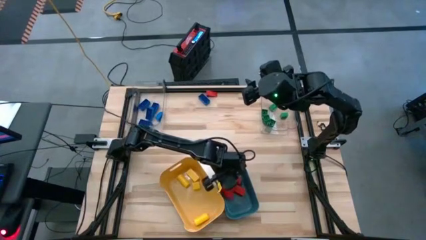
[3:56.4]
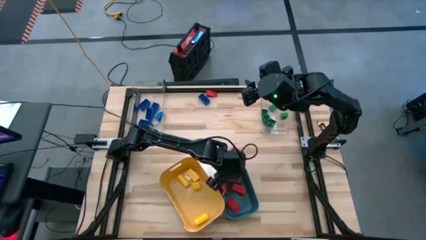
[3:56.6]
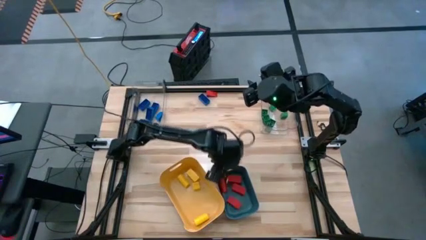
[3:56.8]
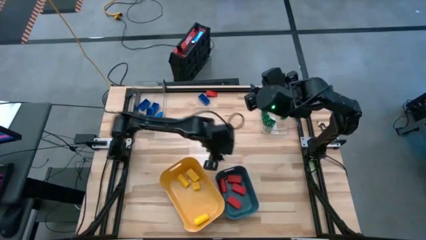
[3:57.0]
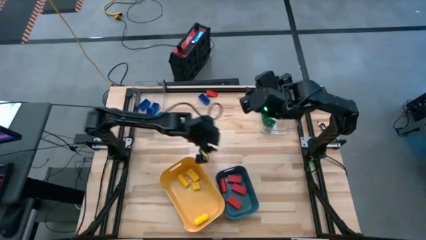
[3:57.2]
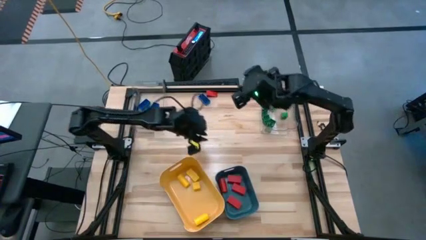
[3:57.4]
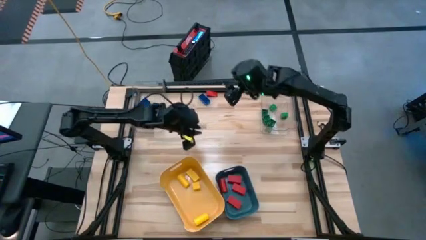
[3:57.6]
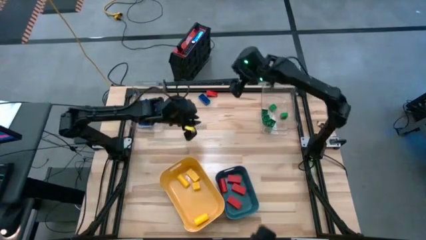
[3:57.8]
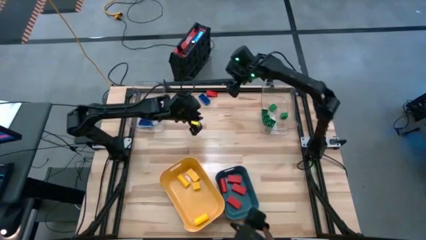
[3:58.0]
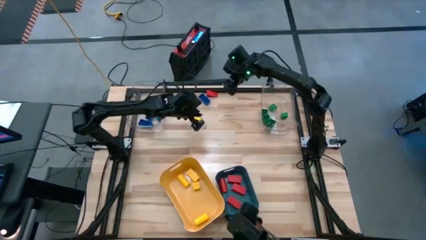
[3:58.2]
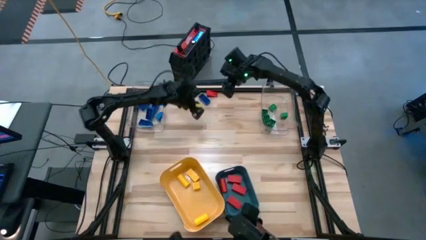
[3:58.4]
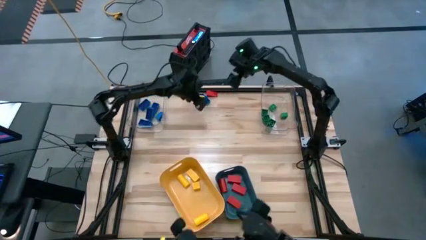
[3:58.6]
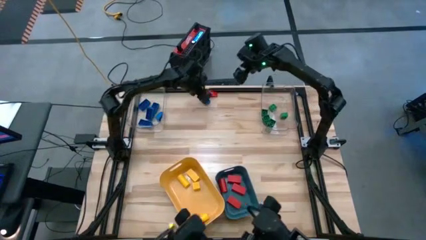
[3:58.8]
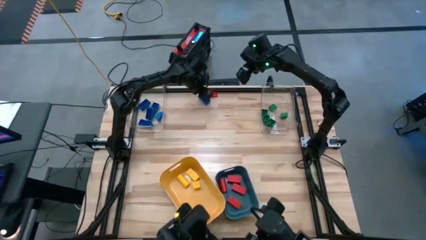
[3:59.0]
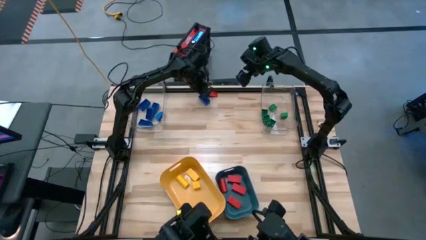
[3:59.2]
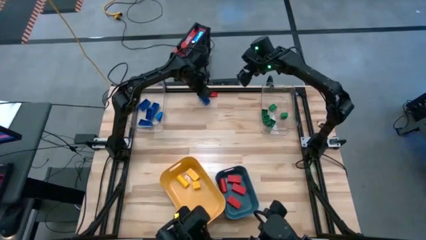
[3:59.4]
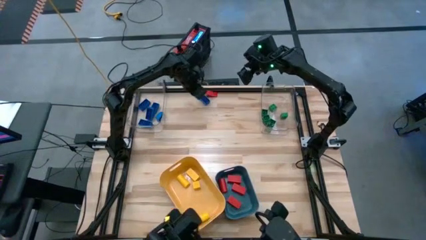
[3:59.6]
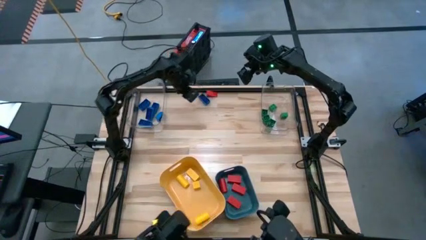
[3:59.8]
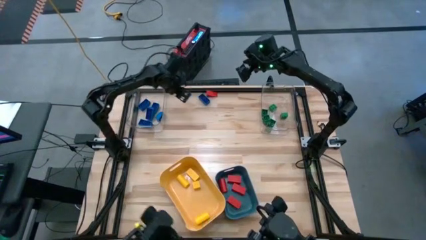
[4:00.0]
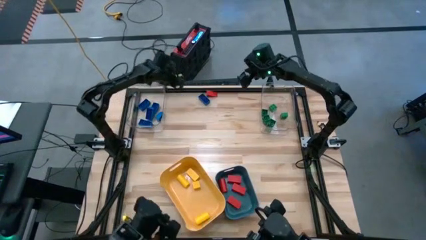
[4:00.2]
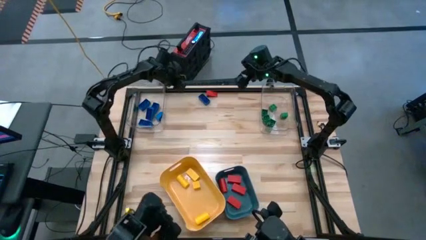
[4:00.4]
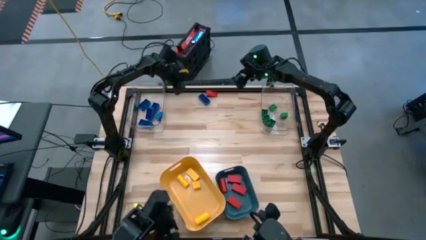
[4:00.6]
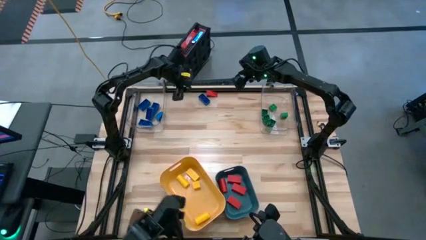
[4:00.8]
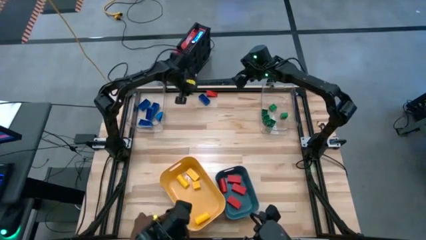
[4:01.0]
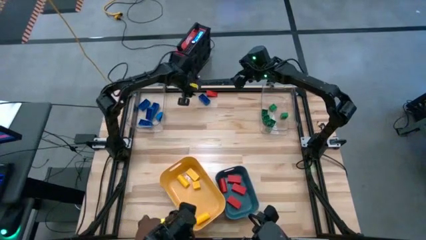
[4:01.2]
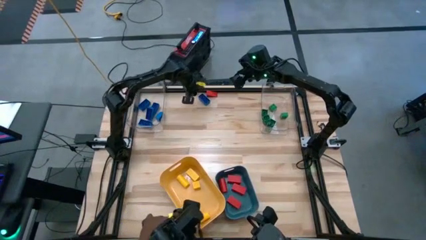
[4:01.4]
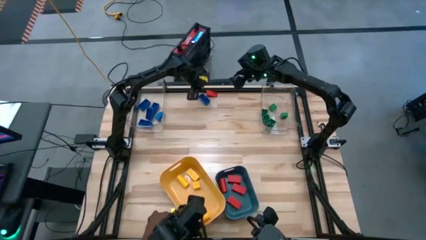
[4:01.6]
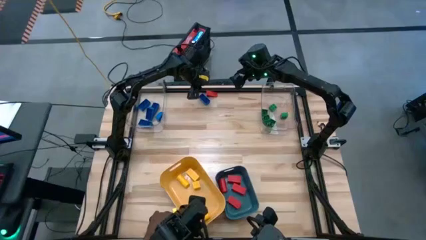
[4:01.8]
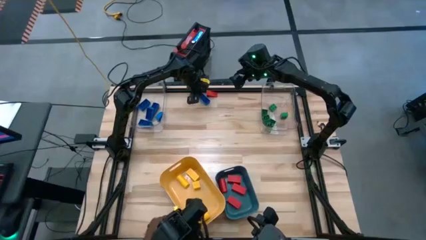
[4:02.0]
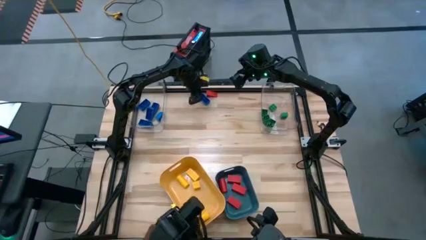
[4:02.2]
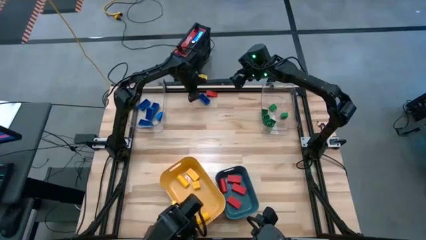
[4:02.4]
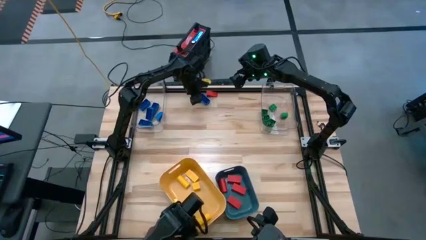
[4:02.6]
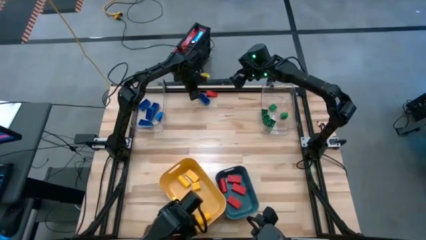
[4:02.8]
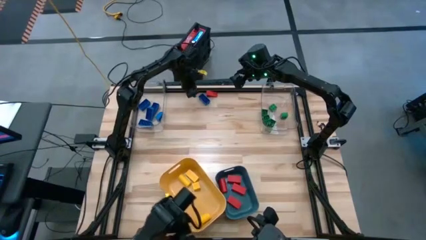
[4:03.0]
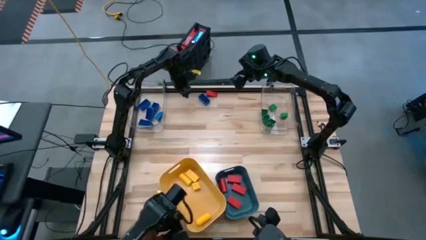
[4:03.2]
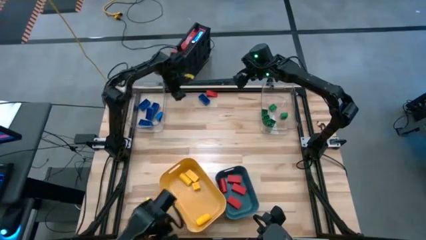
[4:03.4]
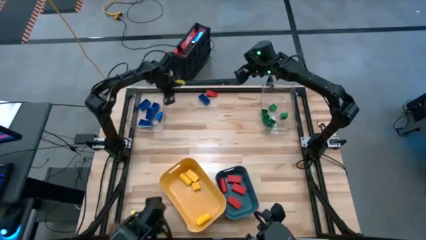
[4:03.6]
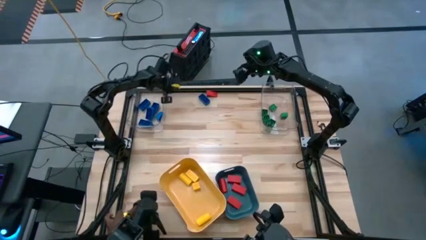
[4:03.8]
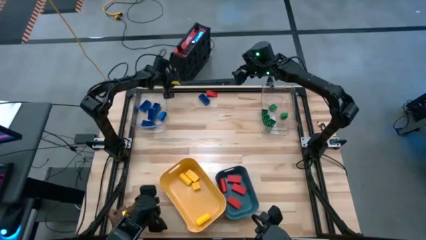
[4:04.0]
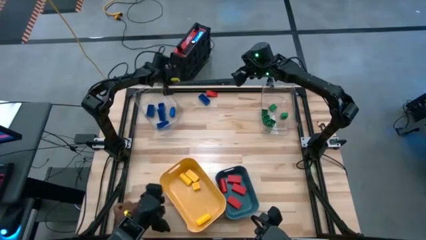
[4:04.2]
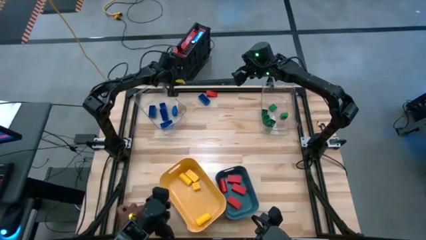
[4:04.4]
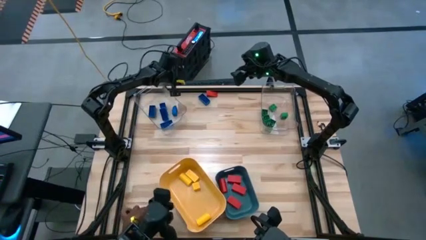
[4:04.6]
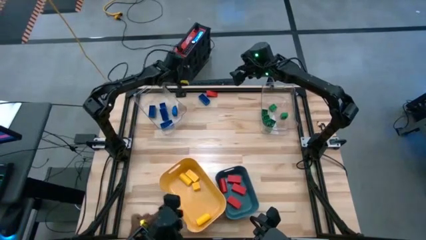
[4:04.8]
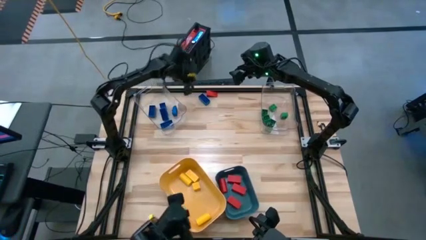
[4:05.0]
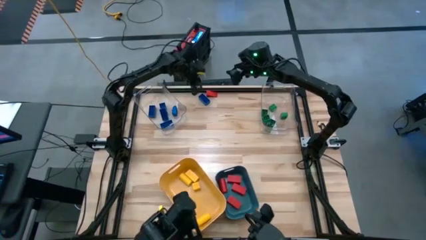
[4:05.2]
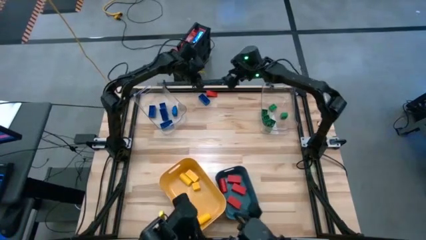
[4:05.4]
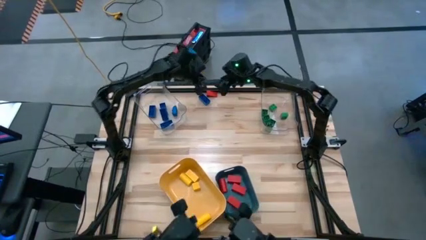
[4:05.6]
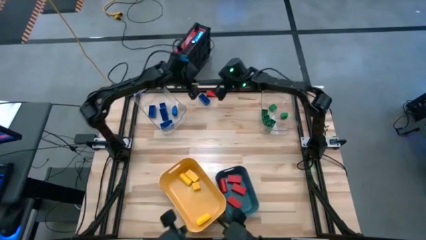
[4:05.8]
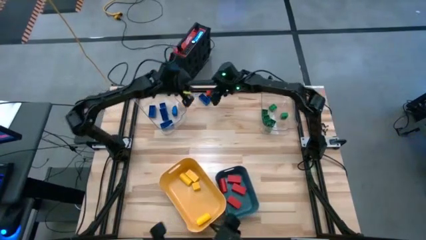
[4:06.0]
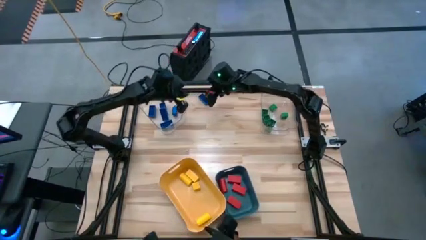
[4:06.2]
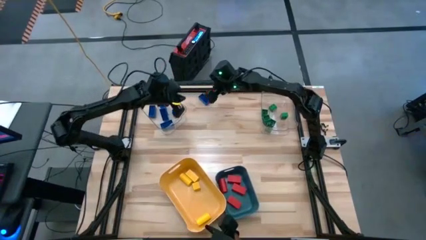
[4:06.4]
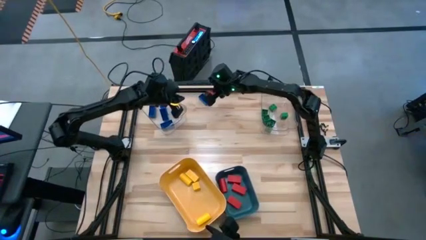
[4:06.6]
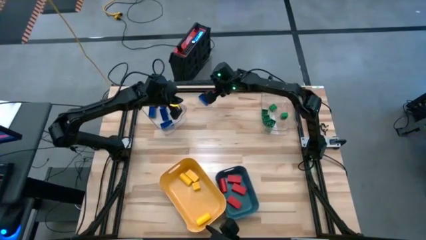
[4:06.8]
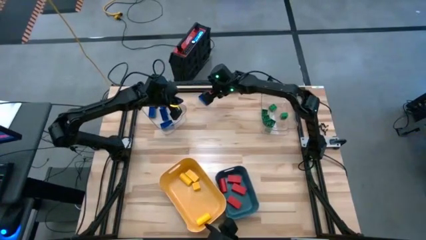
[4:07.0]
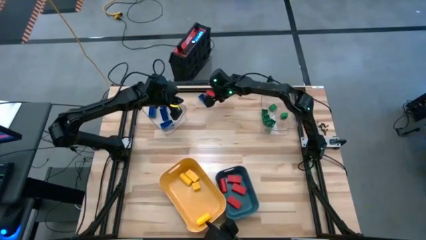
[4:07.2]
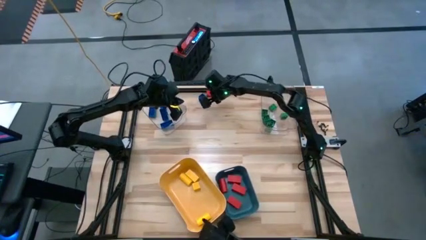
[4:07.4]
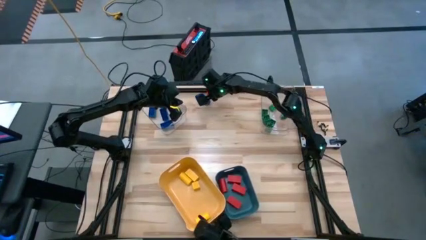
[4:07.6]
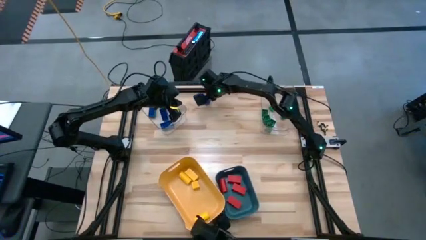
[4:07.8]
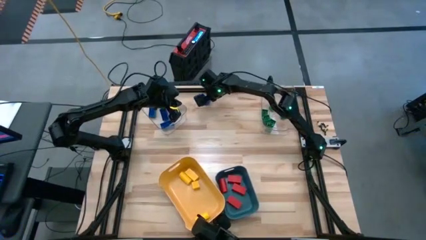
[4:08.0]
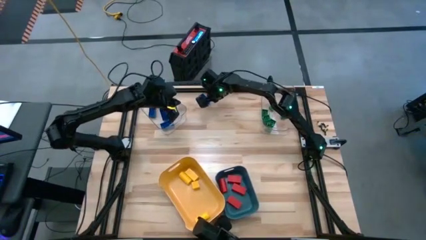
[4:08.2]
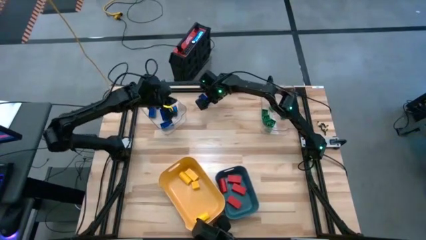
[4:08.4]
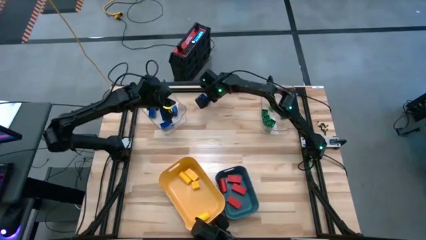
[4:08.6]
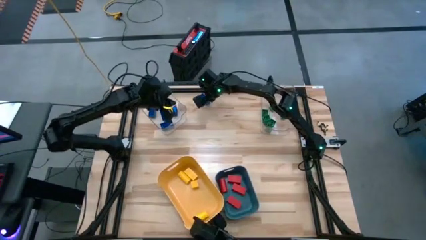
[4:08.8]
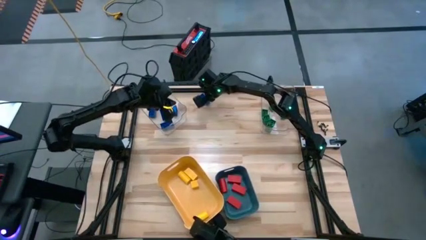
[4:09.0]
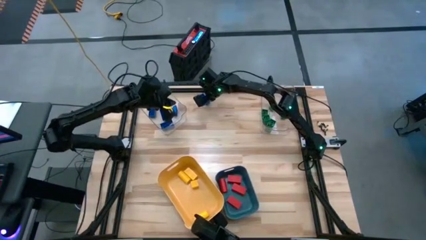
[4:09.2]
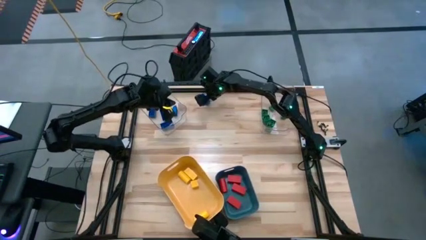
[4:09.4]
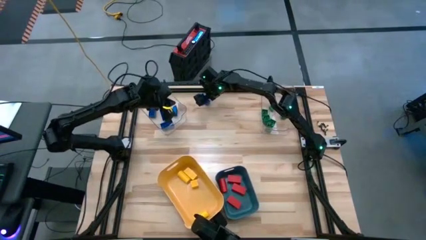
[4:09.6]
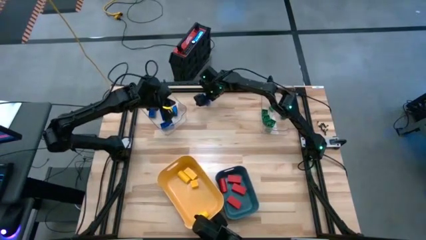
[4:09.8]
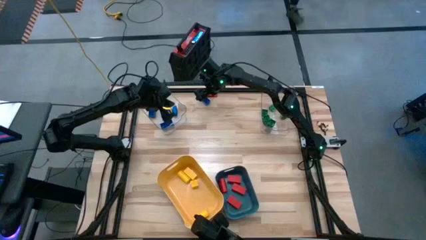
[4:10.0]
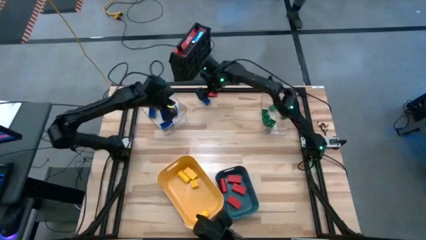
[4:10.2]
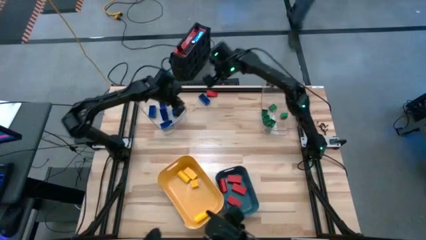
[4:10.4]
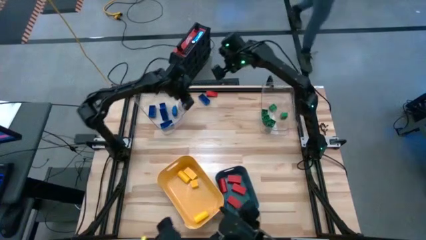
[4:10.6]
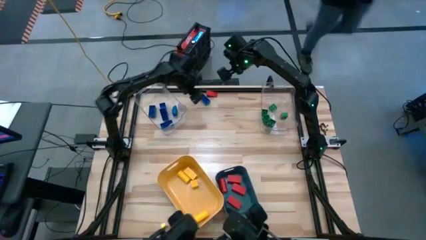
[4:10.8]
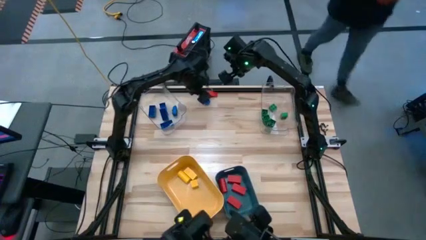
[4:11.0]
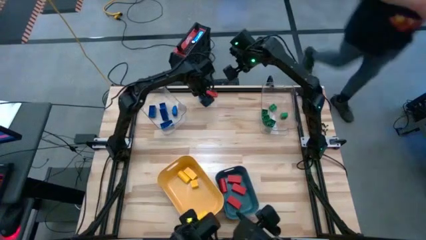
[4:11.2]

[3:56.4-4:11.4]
Task: Sort blocks
Put the blue game piece into the left transparent bin

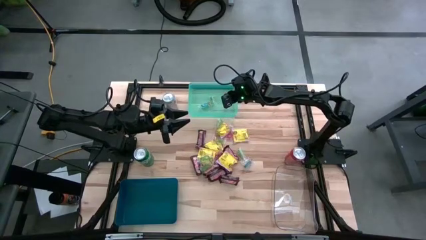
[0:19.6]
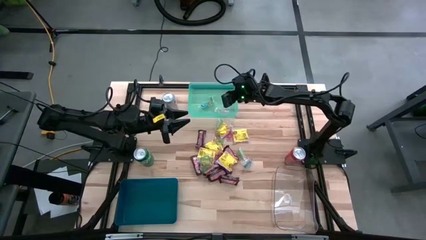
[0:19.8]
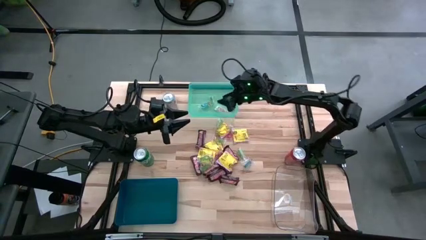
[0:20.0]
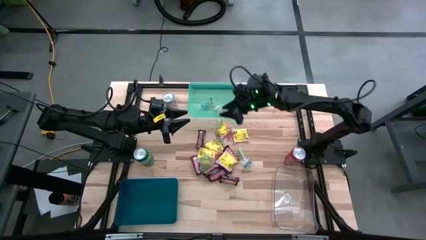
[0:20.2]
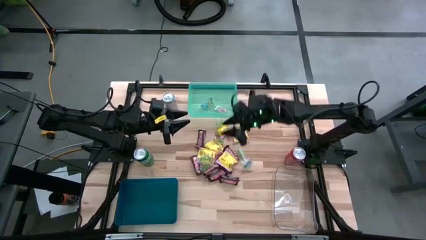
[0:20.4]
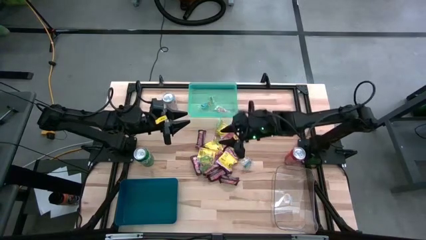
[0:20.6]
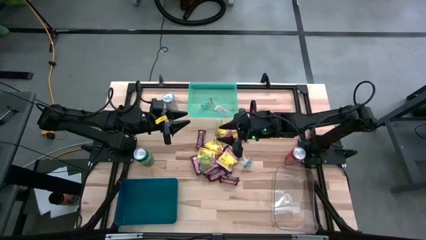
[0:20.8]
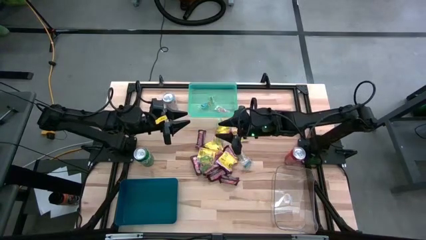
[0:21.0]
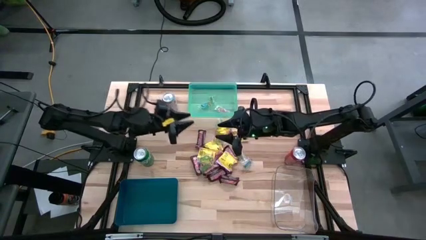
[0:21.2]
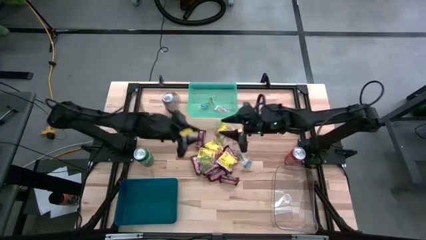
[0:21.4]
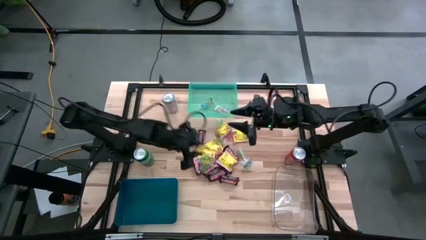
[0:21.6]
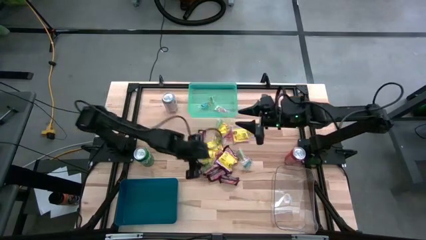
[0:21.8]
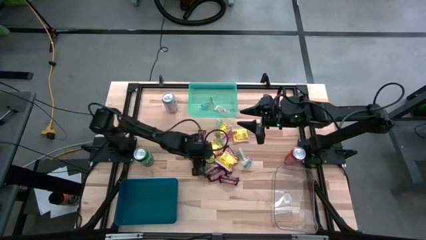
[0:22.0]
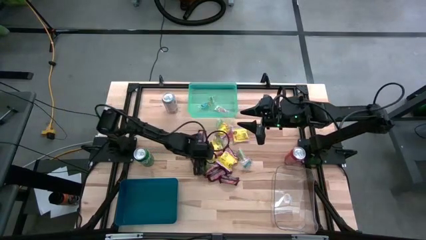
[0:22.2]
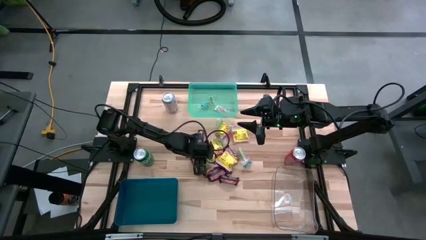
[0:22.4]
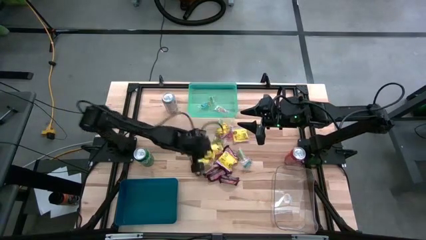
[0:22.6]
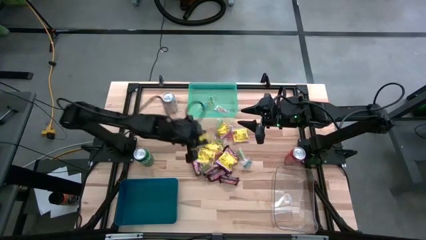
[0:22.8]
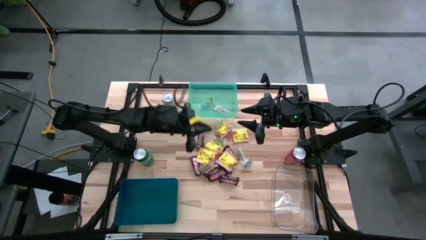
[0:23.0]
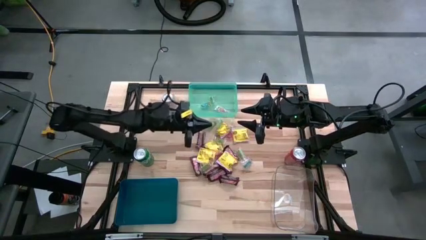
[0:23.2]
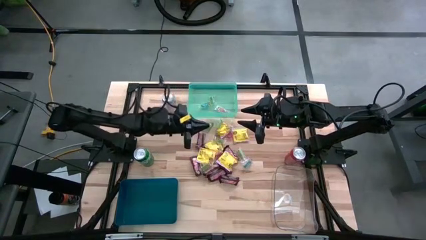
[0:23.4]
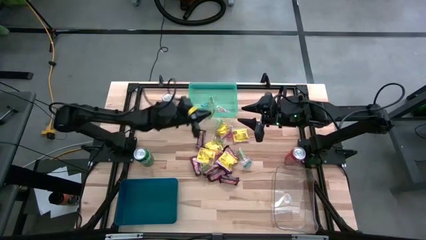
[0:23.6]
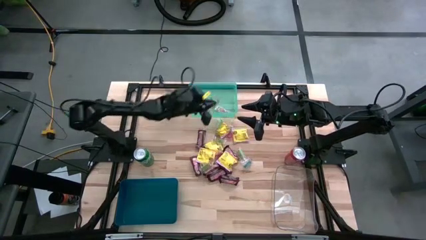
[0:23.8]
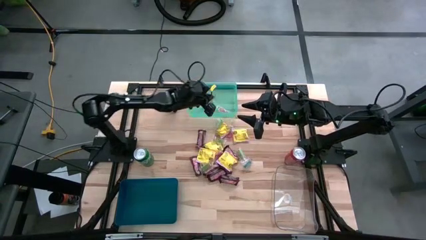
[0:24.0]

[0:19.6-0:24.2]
Task: Sort candy
Put the green gummy into the light blue bin
